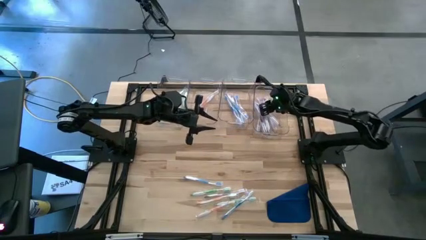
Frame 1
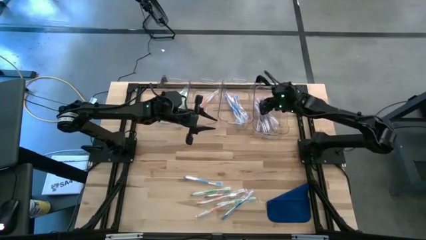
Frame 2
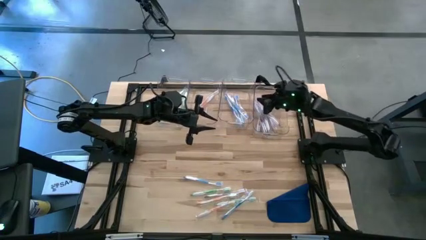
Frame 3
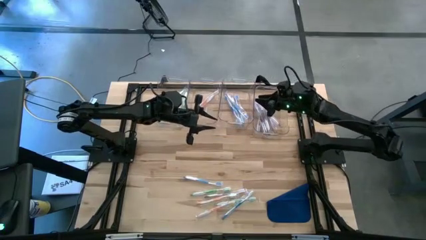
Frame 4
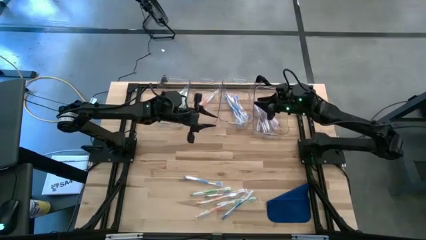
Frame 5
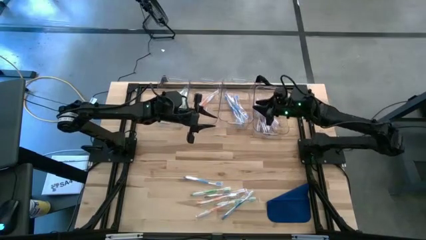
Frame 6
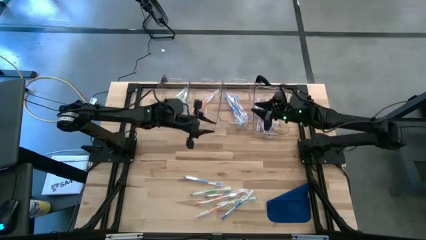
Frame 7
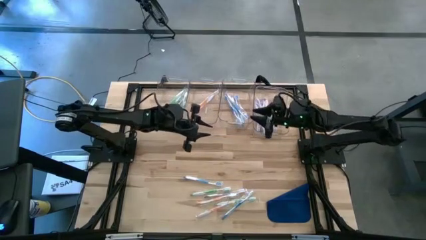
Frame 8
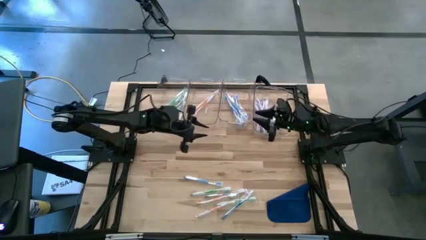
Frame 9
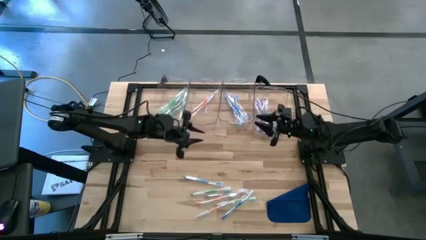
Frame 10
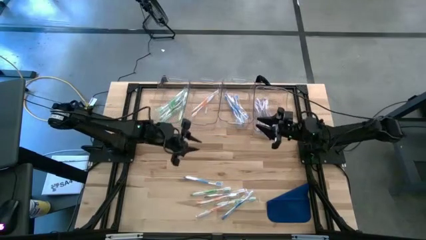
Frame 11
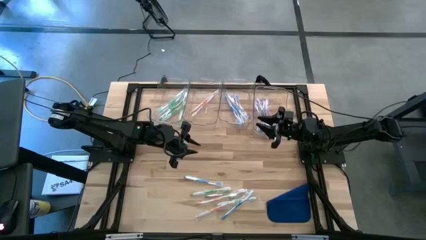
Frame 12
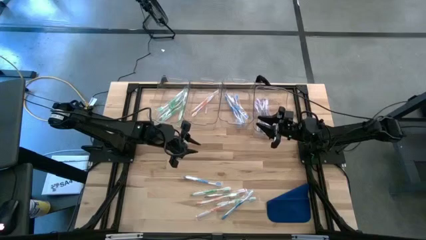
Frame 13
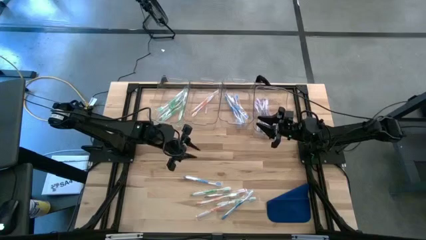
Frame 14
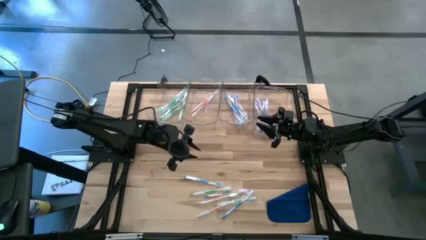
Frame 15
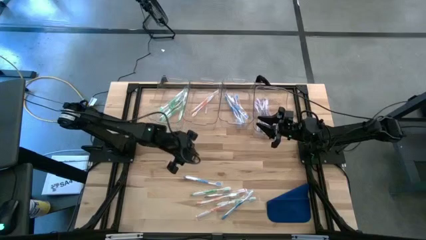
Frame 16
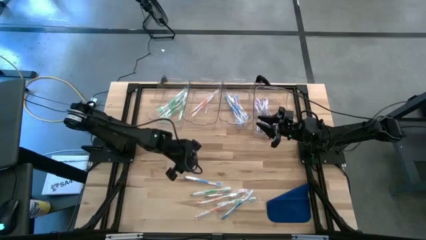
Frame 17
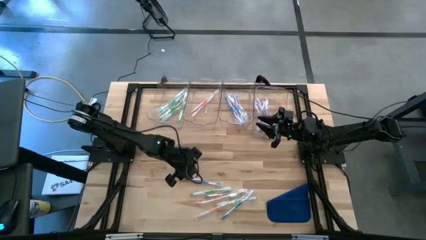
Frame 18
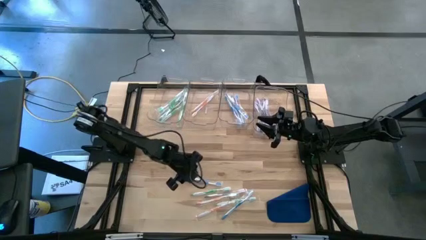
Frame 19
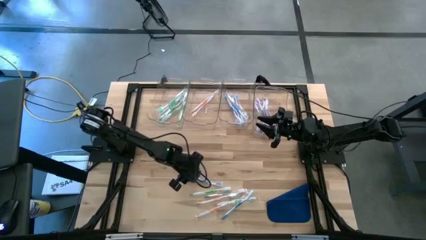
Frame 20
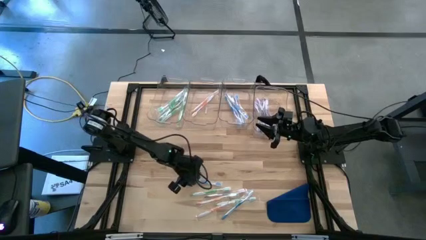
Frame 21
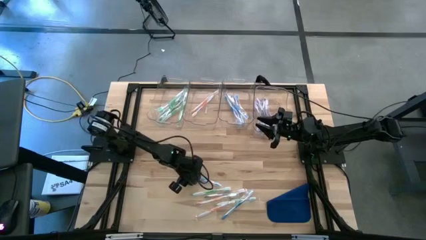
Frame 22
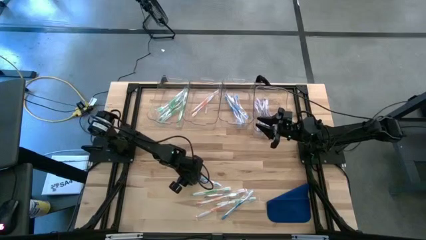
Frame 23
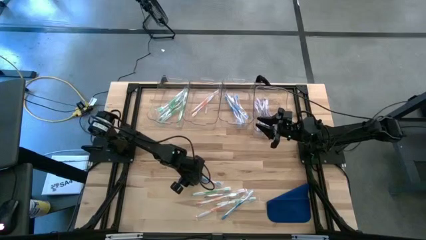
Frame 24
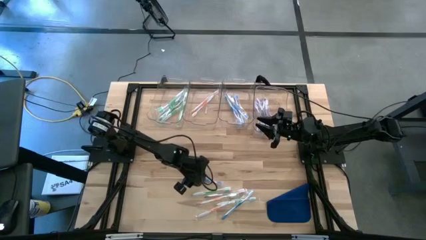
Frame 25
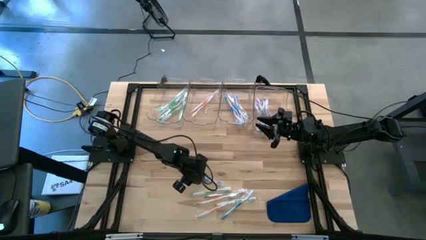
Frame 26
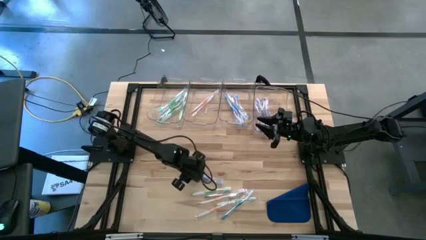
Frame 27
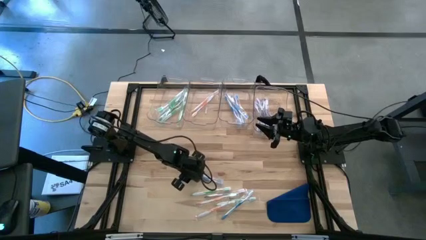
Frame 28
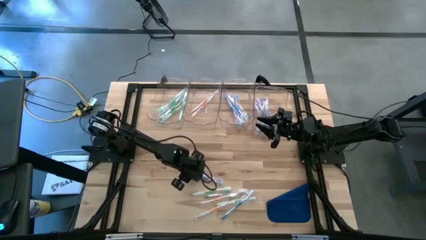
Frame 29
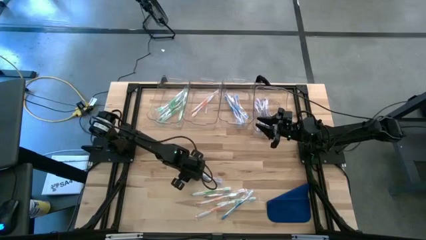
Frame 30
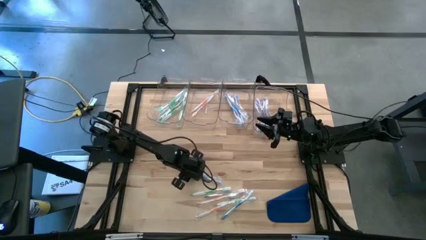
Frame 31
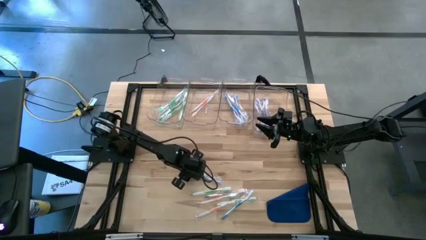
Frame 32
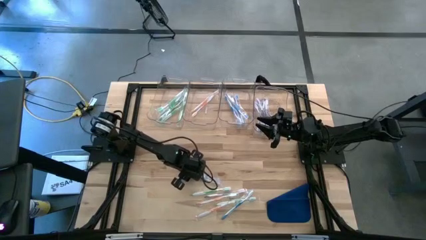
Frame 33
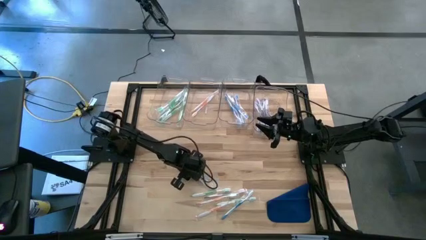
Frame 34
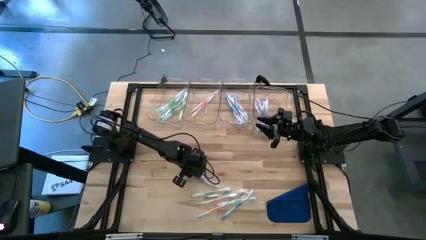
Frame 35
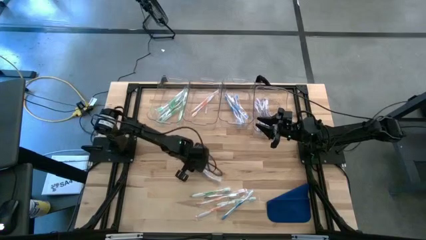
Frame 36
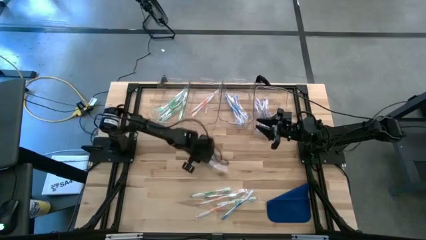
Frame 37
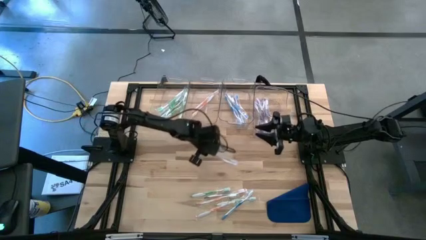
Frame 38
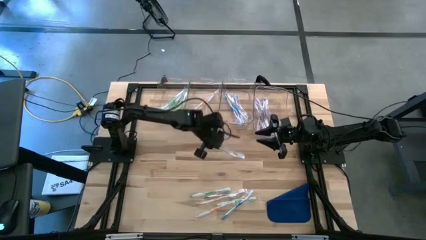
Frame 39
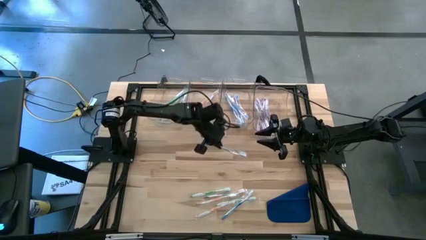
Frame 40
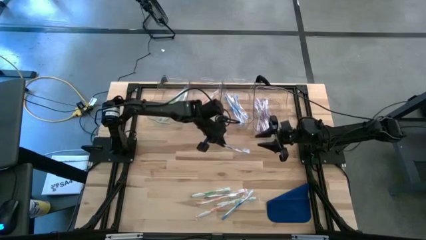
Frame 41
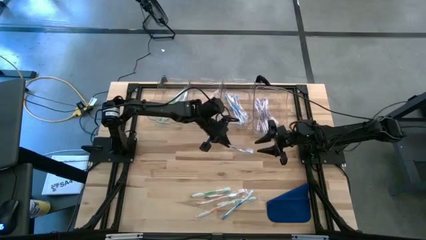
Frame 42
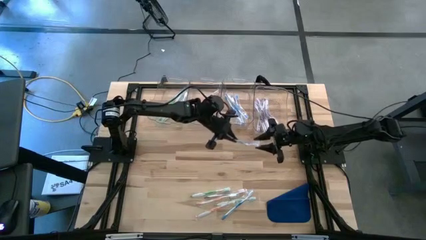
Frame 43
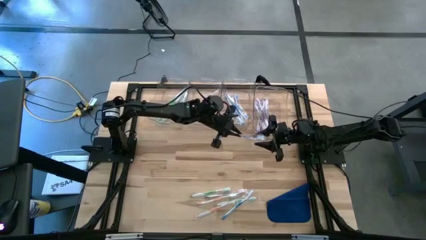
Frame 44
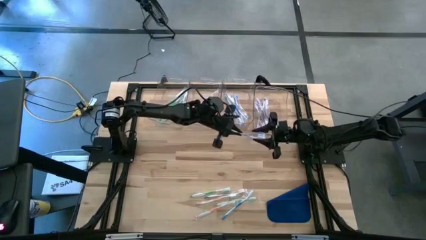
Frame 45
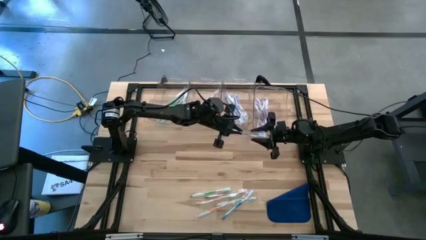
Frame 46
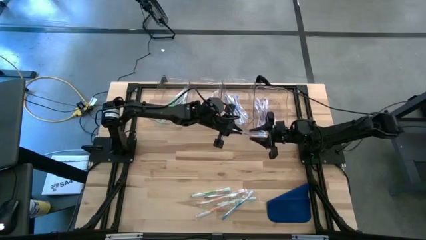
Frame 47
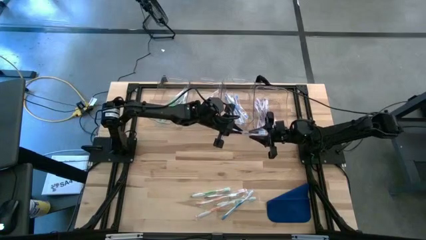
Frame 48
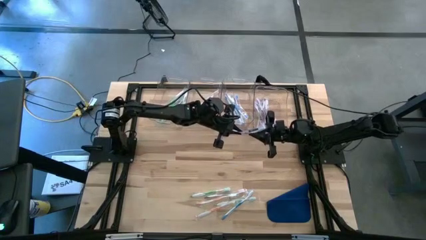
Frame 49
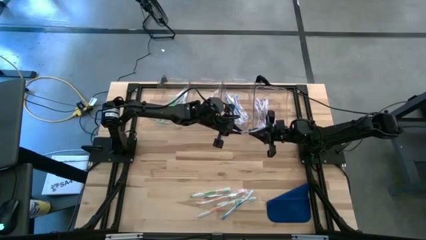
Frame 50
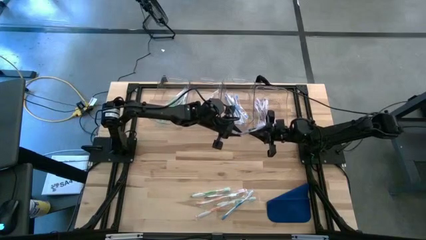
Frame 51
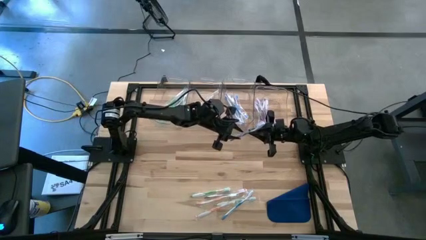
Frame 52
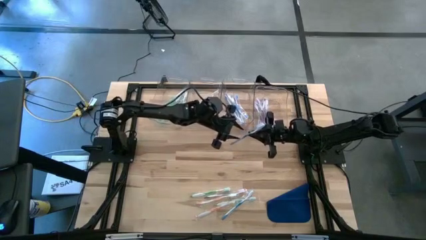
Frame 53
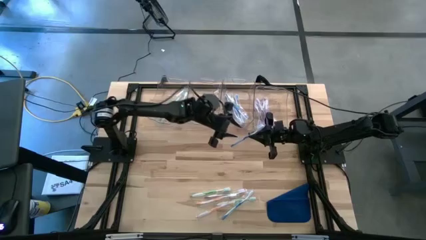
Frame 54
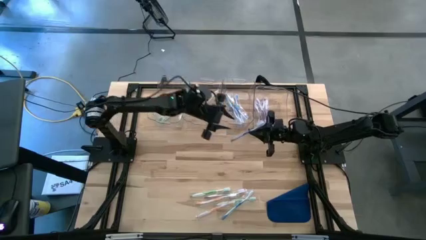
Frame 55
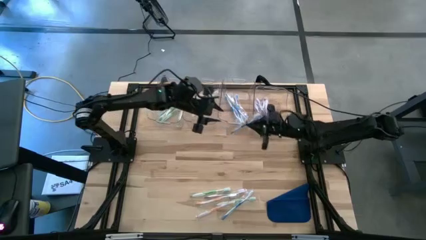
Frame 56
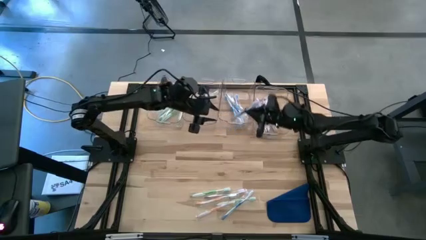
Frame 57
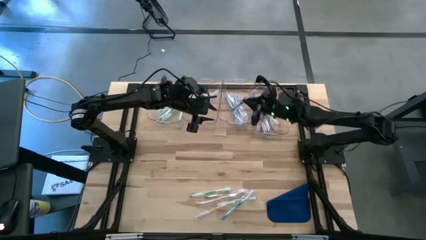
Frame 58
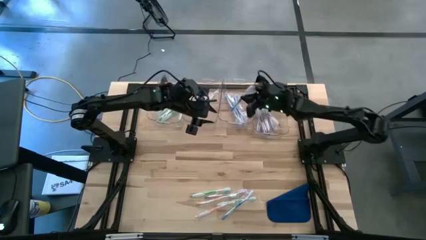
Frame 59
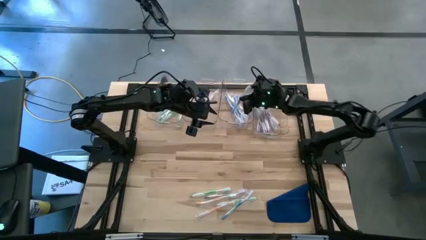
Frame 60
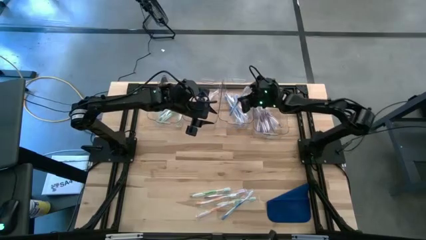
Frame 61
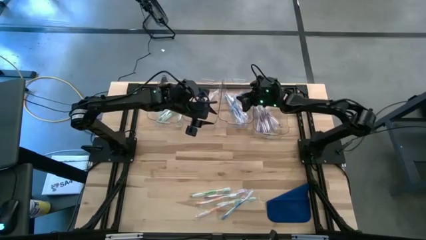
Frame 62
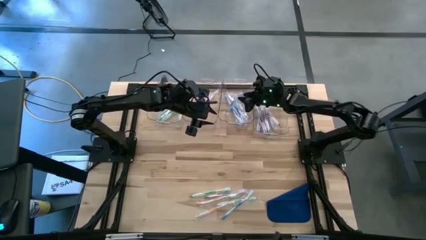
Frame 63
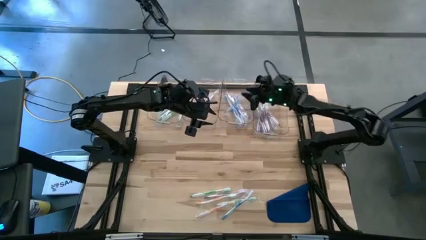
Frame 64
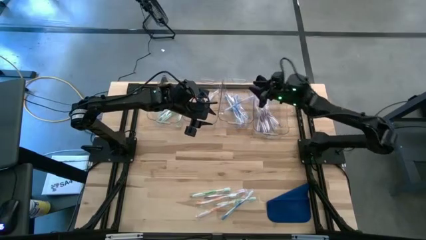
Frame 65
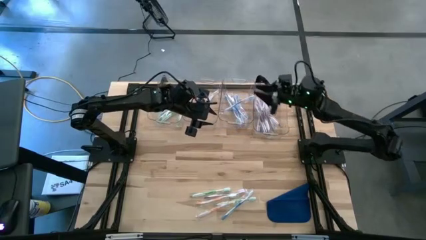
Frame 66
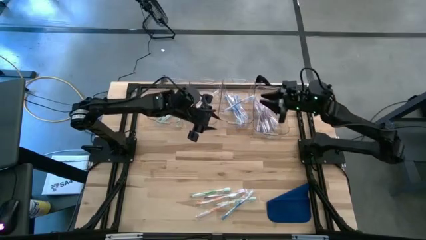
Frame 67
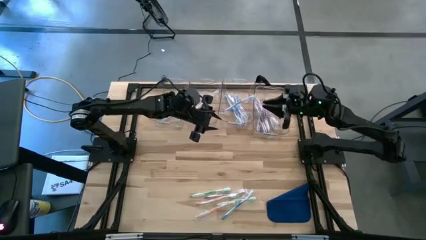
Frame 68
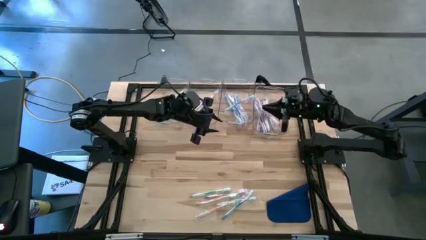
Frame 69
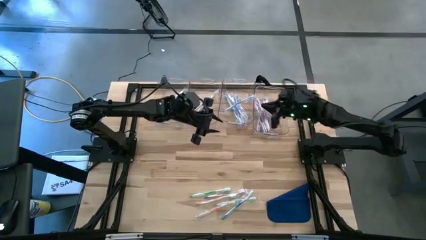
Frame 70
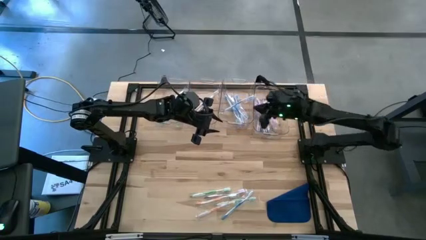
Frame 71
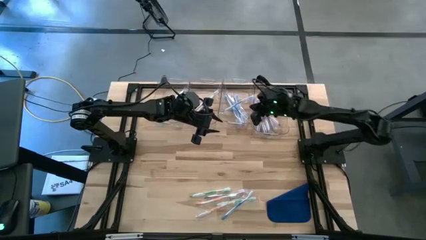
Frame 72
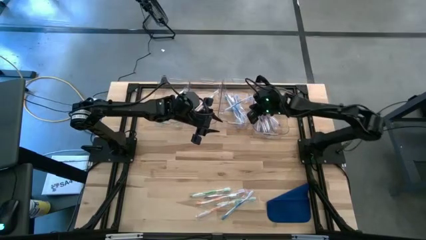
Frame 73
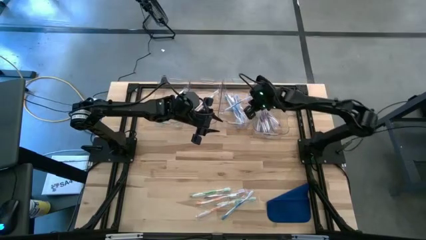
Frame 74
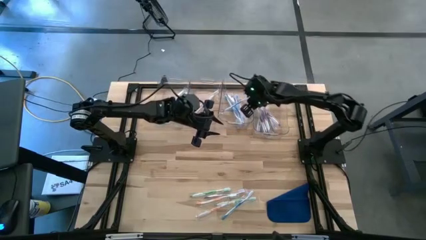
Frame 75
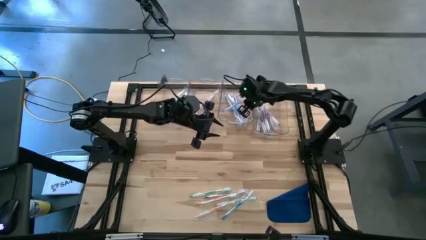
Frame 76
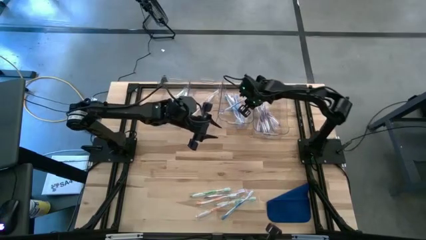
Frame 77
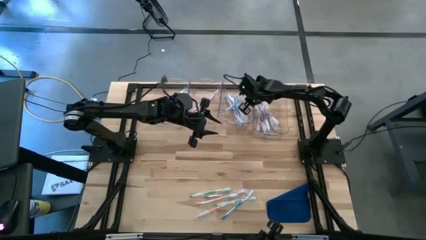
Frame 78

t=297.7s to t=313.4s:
Task: Pick & Place Toothbrushes
Put the blue toothbrush into the middle right transparent bin

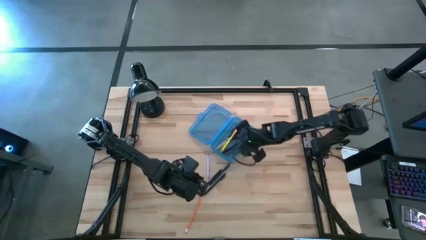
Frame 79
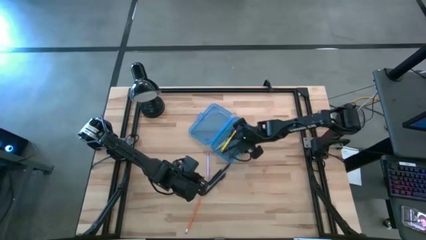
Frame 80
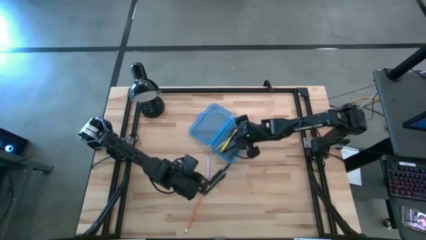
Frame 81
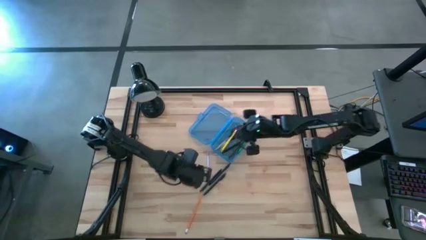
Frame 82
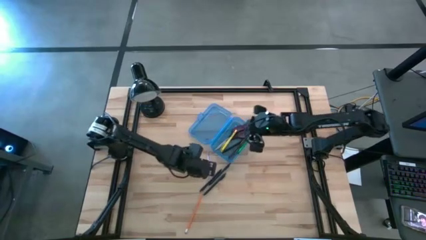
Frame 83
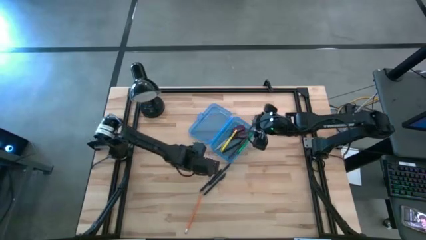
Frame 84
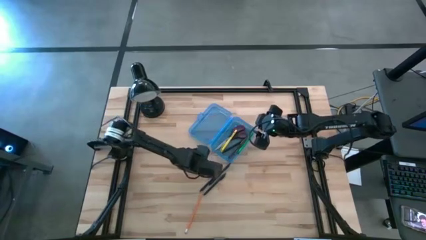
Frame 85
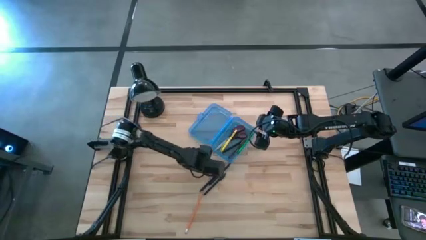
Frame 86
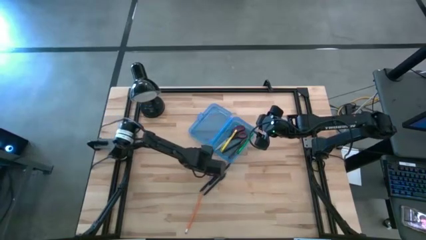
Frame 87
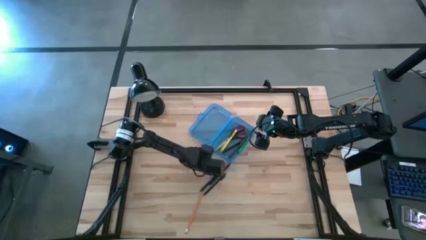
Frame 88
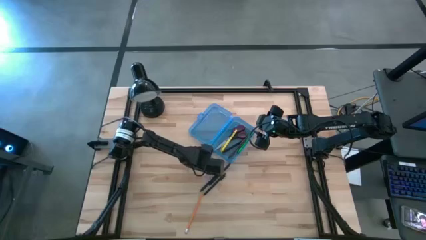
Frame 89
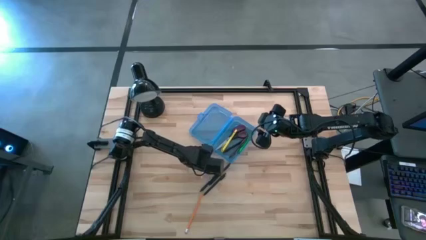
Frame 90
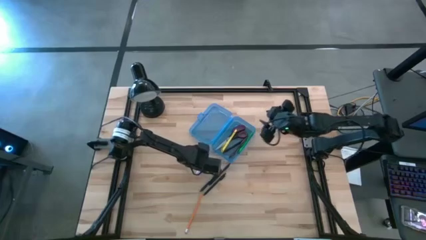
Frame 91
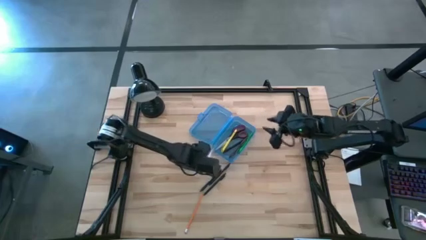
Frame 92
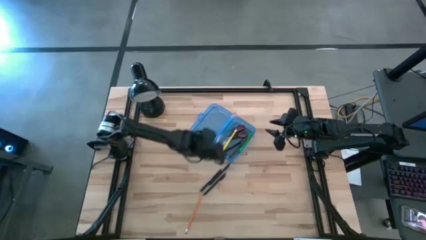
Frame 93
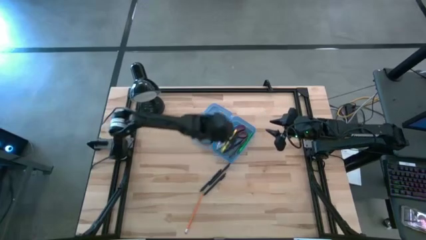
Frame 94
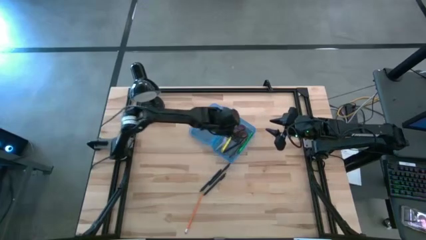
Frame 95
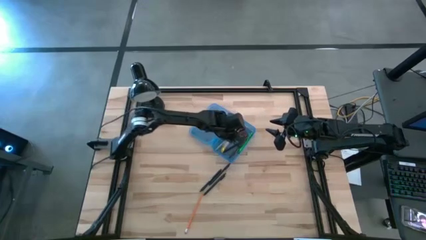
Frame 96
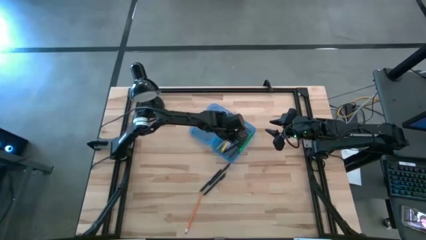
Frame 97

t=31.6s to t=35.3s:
Task: Pick & place school supplies into a supply box
Put the purple pen into the supply box
